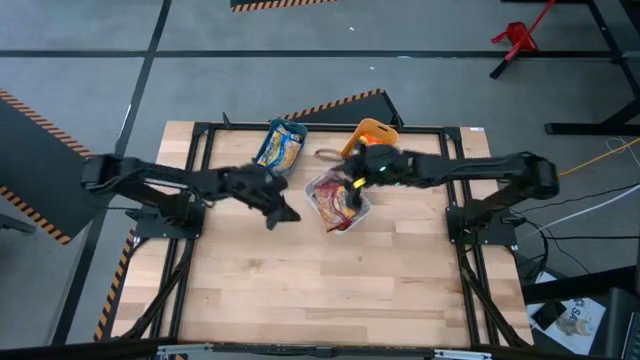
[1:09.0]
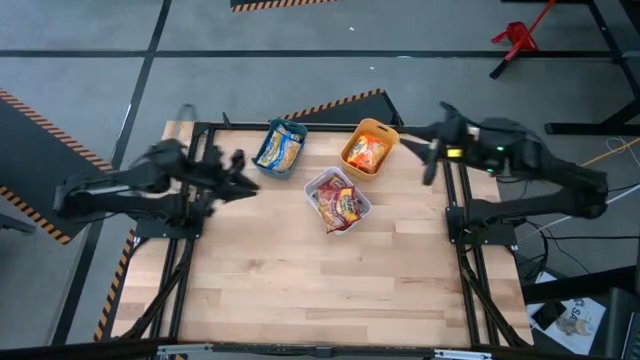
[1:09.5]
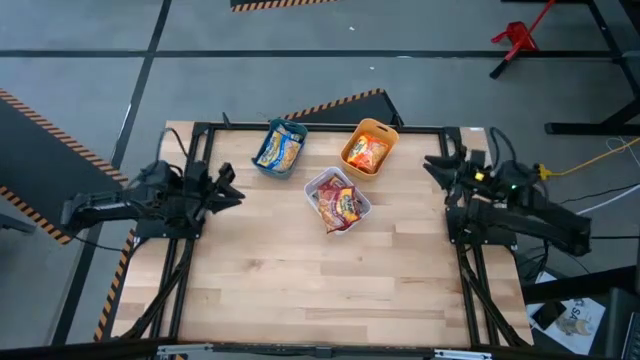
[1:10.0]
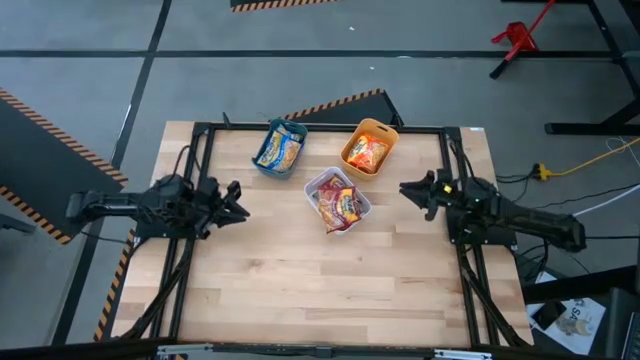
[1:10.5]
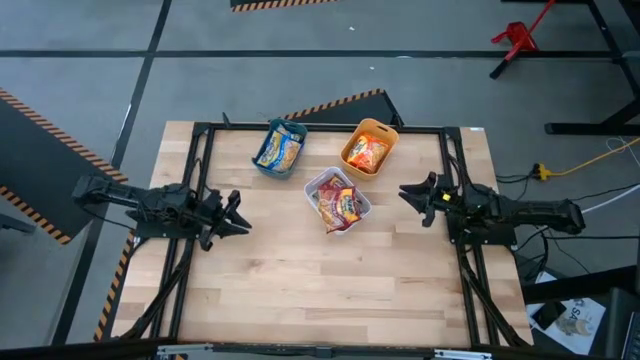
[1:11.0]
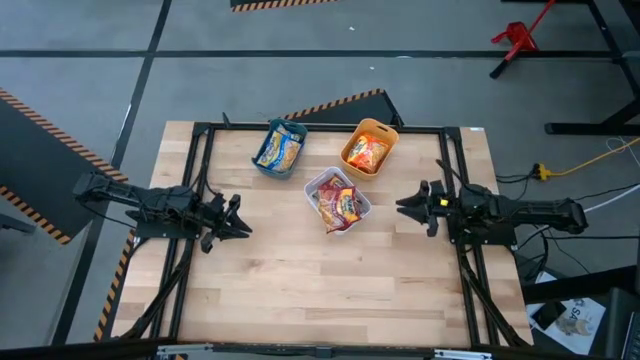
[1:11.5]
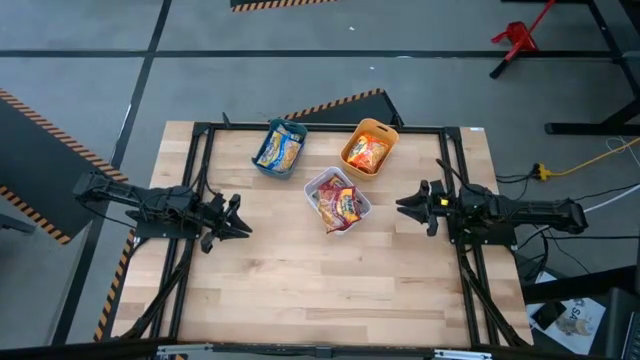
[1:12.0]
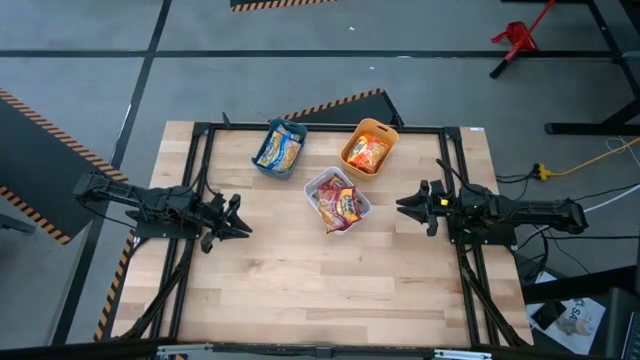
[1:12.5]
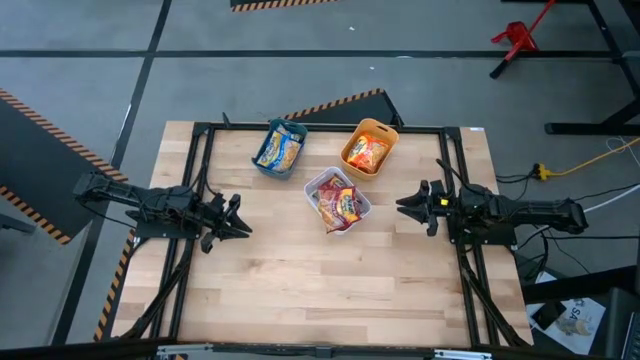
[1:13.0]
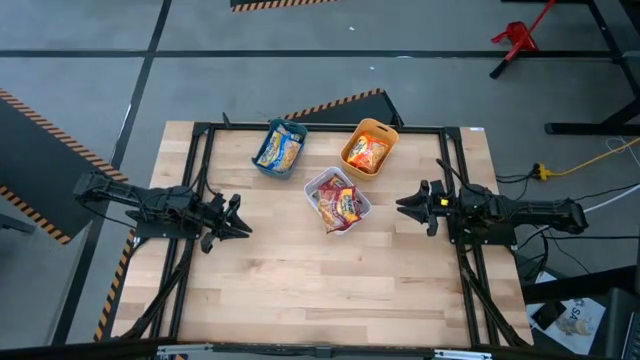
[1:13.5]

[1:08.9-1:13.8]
Task: Sort Maruchan noodles
Return to Home Position

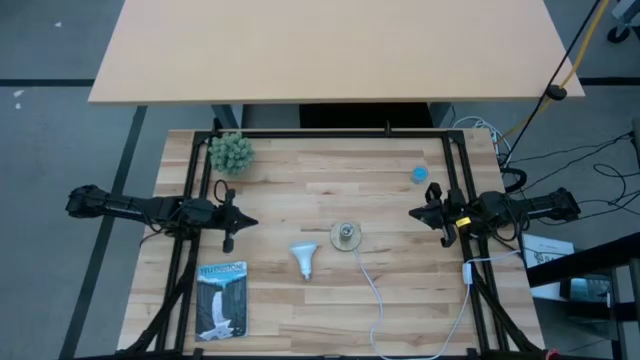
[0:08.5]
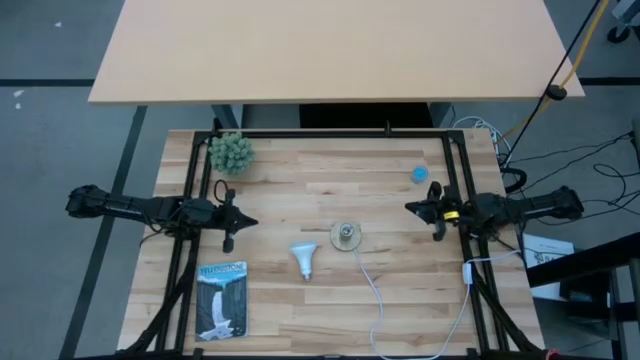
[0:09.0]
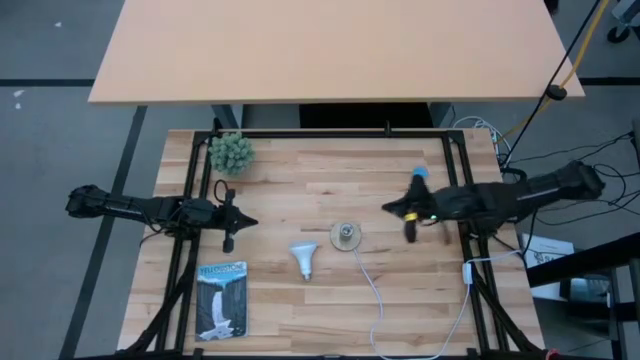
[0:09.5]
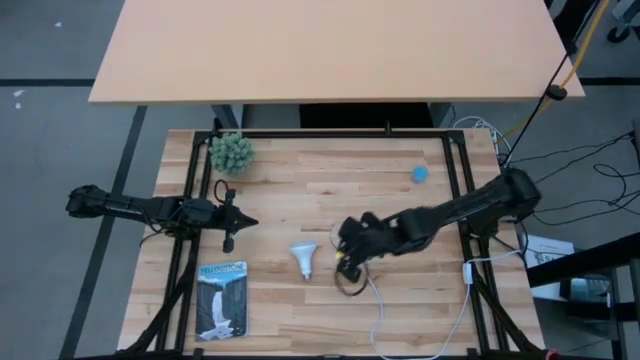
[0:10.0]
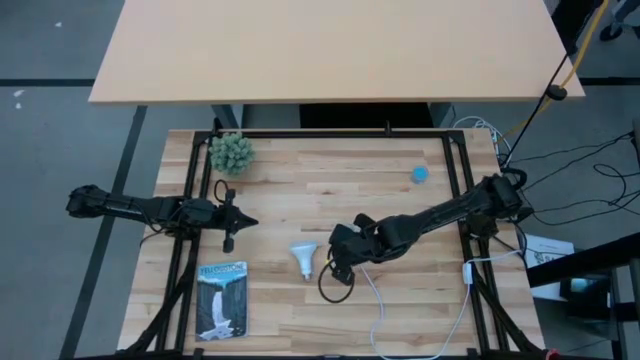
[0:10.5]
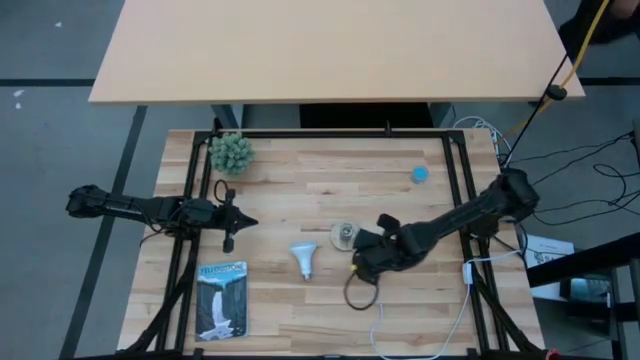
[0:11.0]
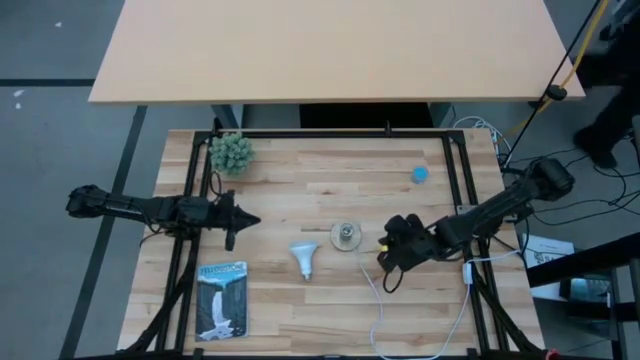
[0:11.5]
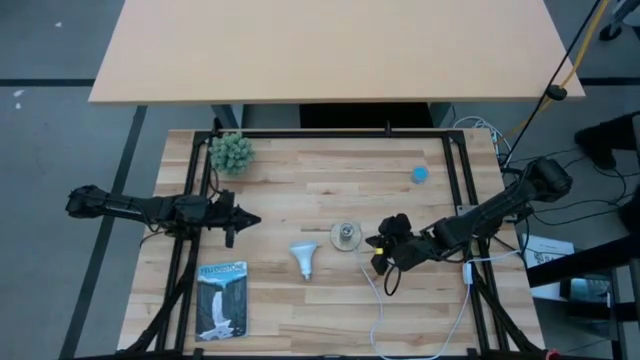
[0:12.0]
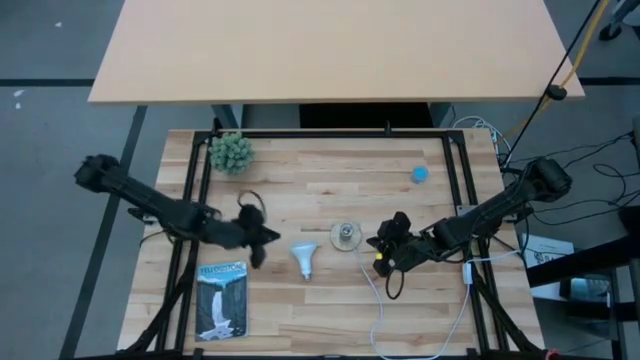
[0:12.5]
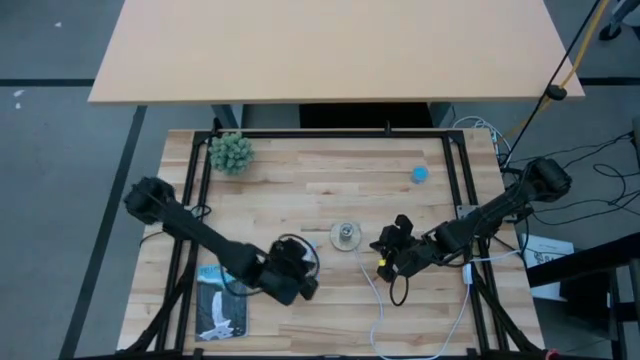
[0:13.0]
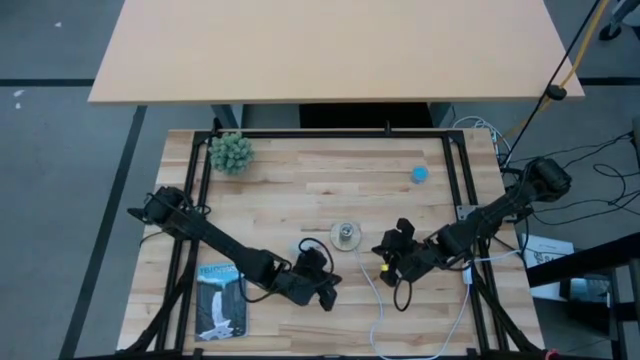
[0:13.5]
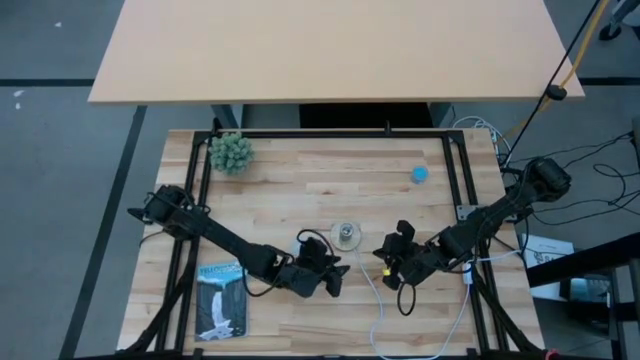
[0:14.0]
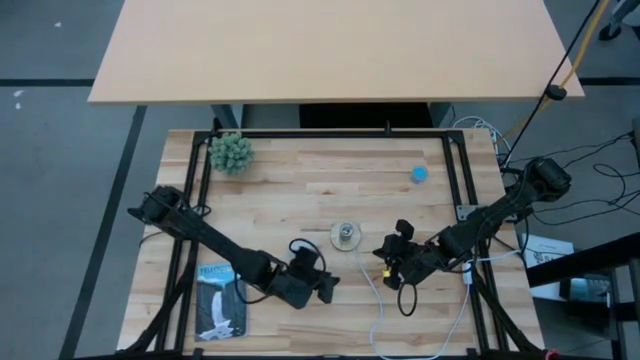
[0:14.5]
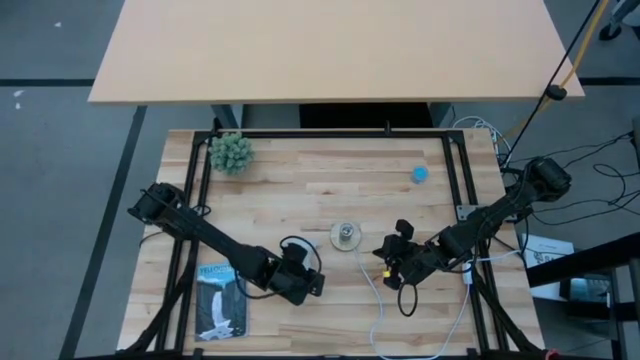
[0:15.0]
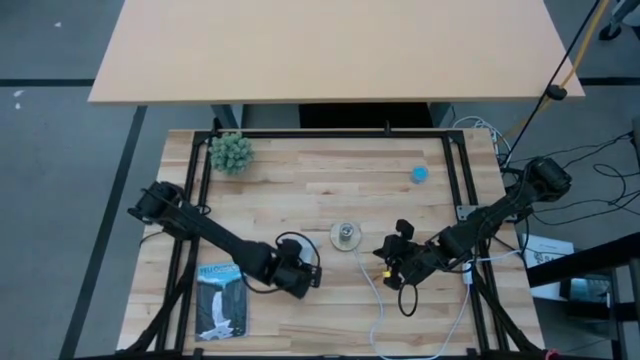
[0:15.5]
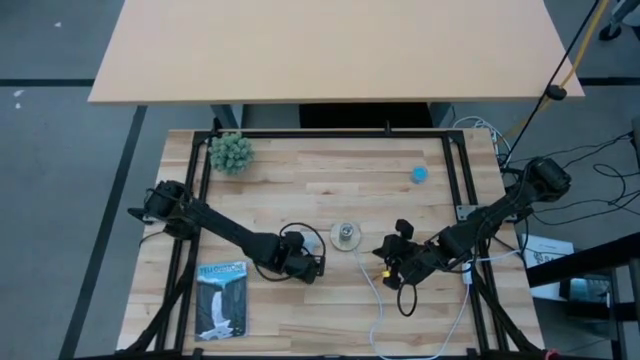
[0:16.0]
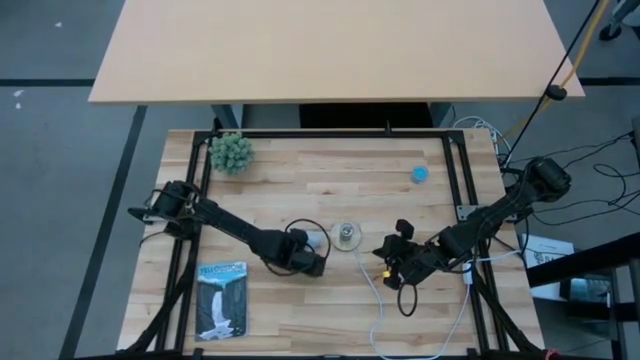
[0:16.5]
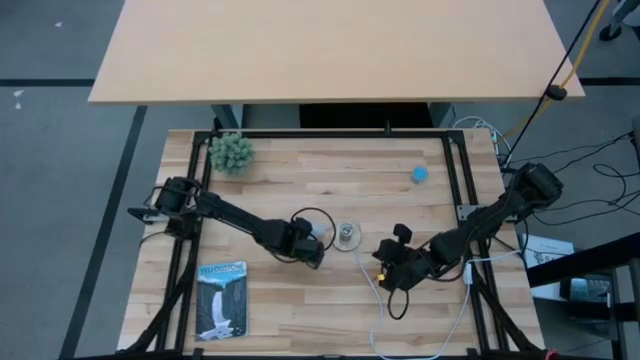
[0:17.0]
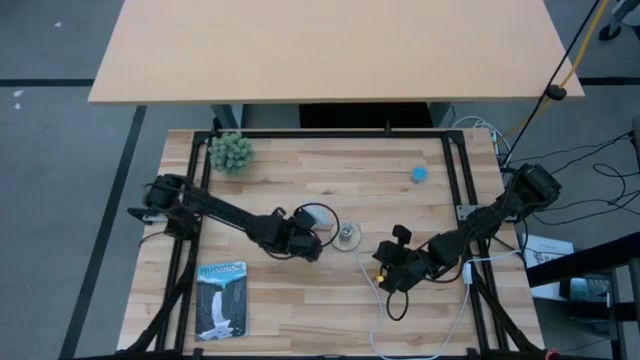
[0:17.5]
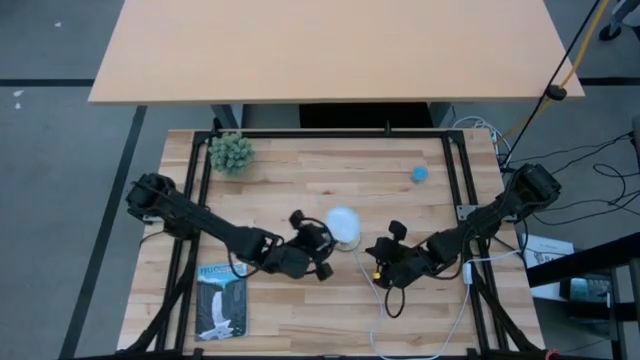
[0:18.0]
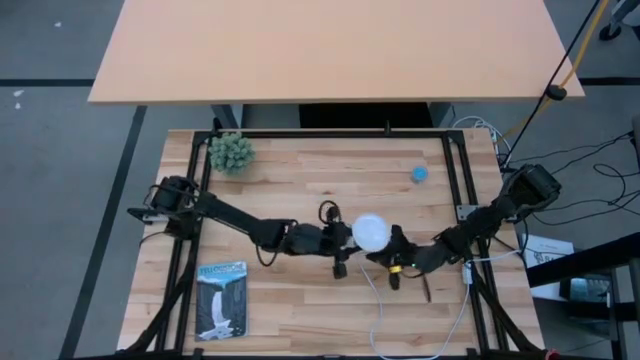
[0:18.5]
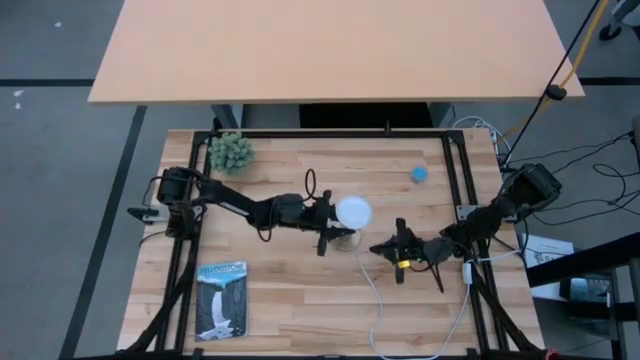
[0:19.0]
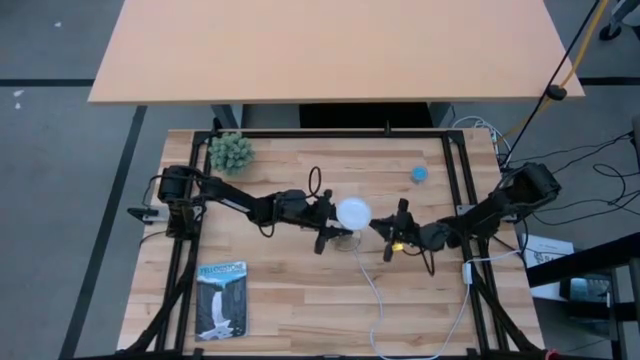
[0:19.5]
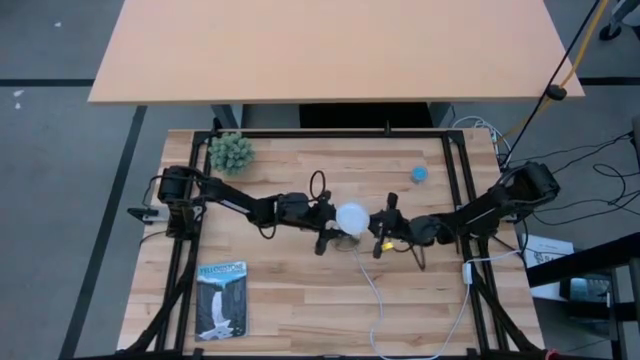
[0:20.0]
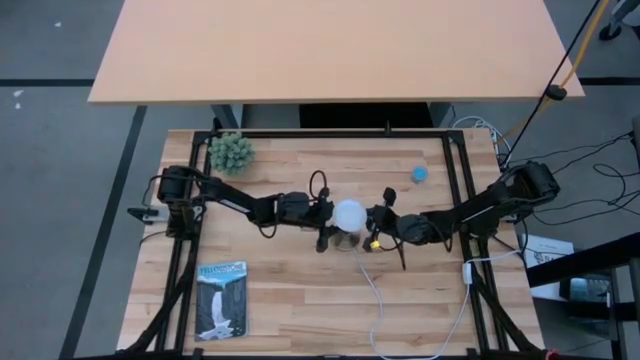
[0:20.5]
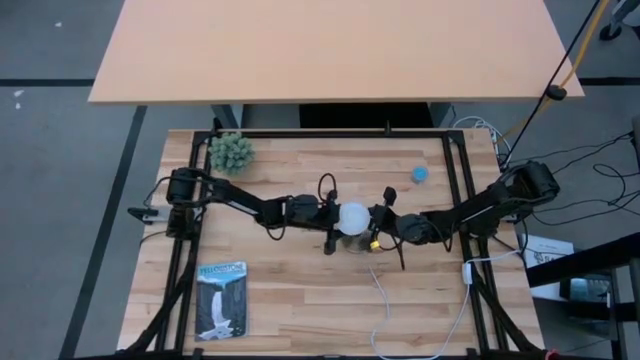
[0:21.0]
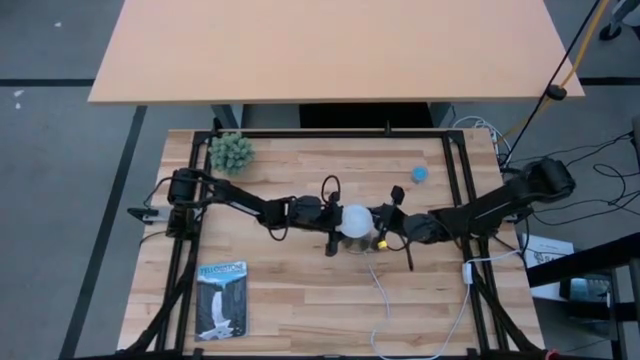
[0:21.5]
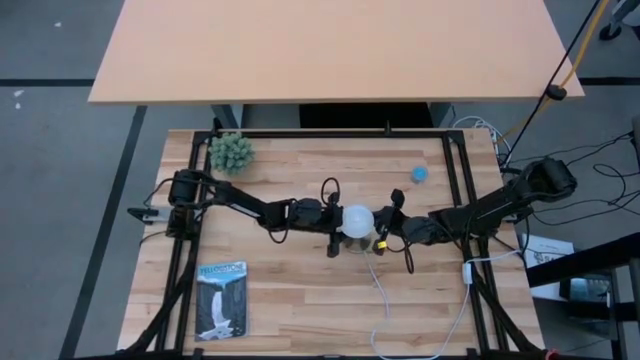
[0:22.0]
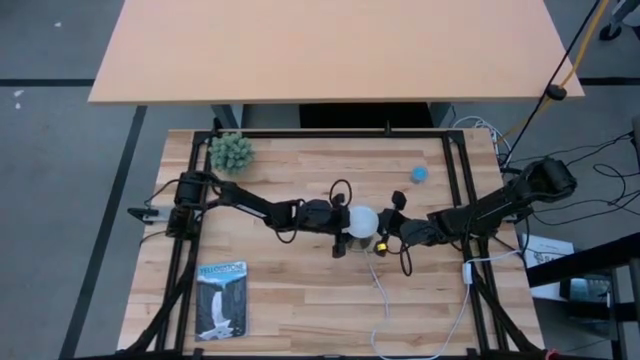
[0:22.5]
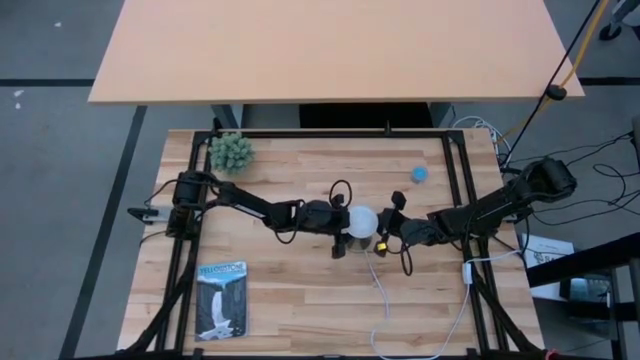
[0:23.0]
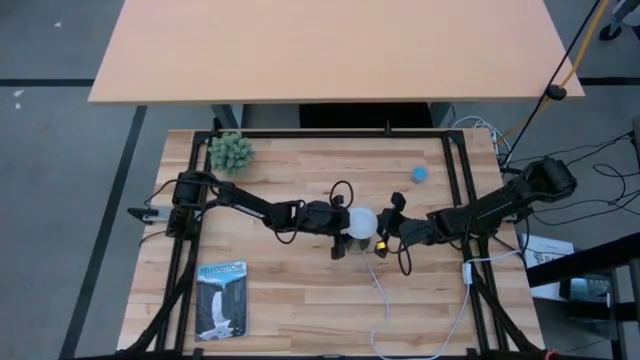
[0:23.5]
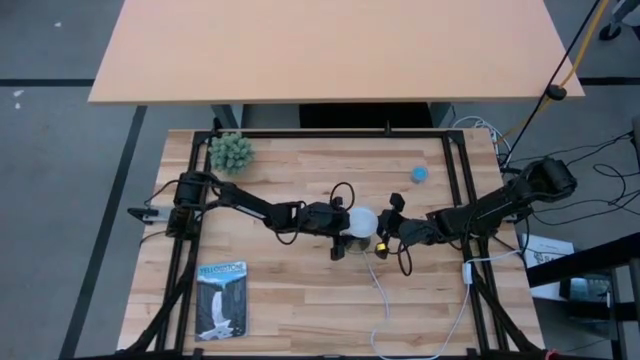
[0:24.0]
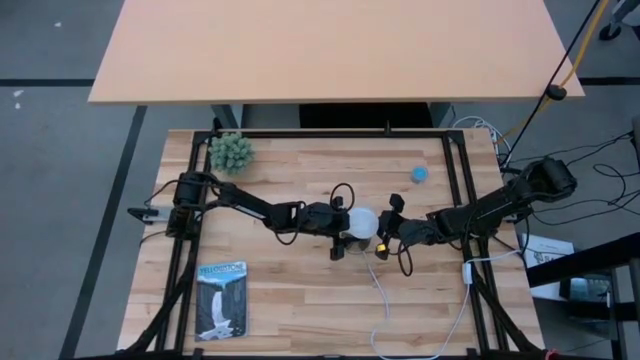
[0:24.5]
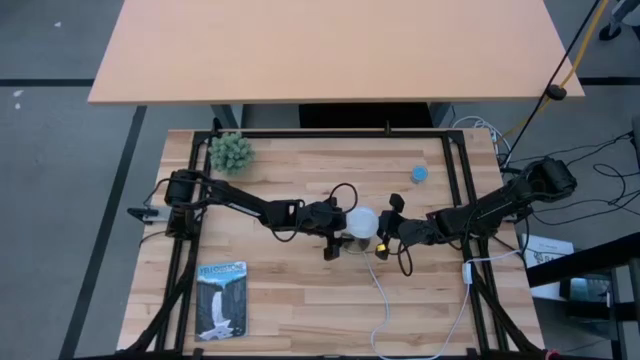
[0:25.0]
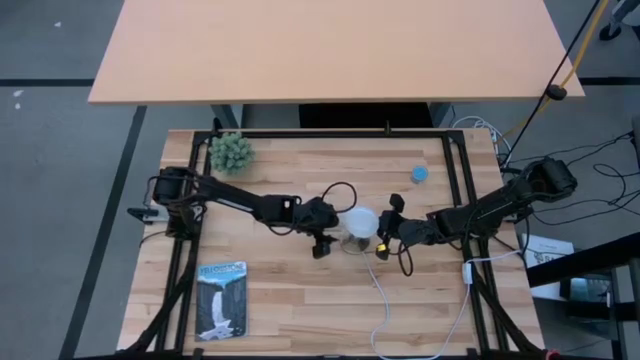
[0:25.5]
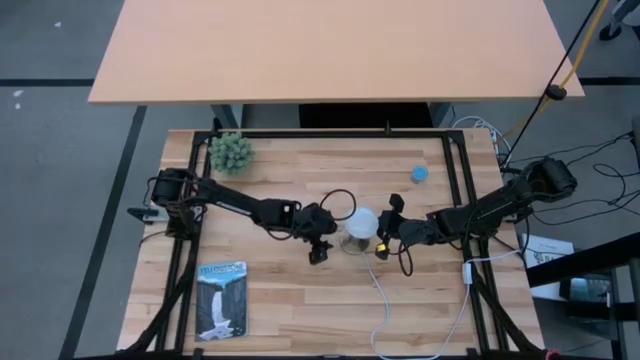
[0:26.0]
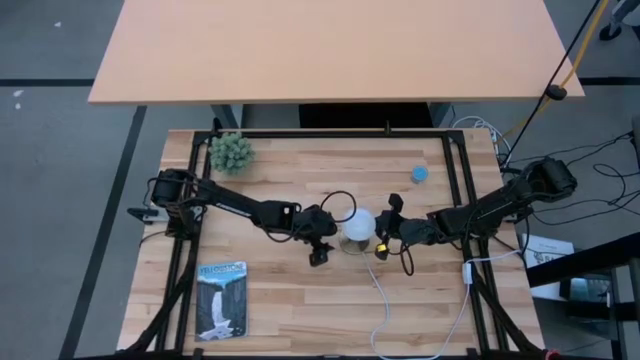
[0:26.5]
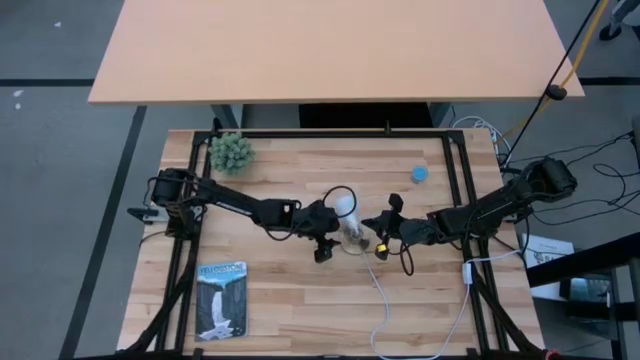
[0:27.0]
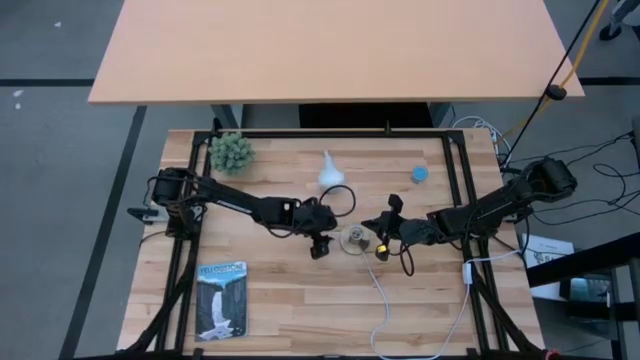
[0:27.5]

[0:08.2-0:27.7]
Task: Screw lightbulb
Insert the lightbulb into the lamp
